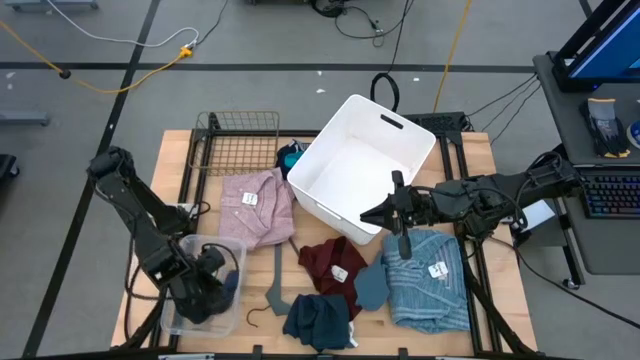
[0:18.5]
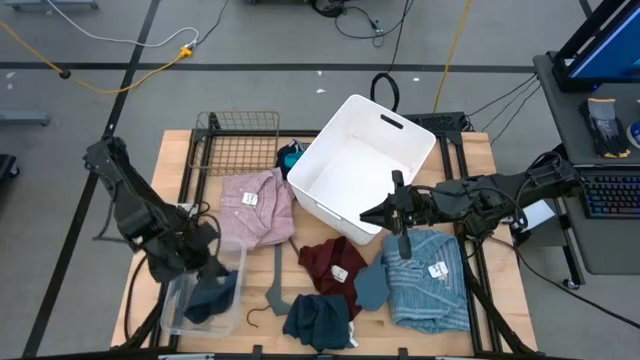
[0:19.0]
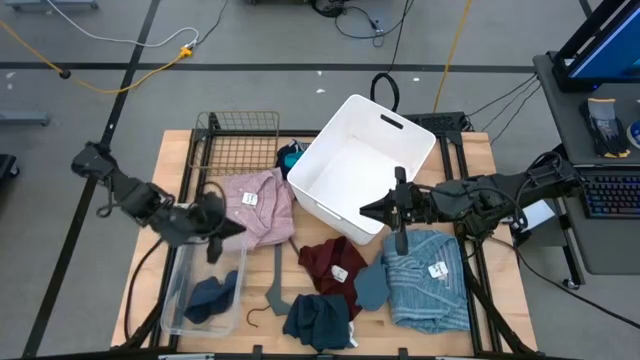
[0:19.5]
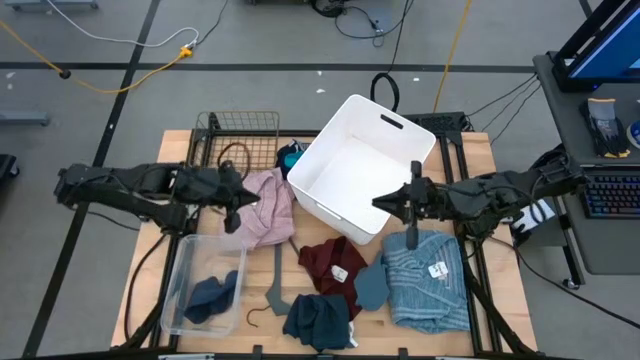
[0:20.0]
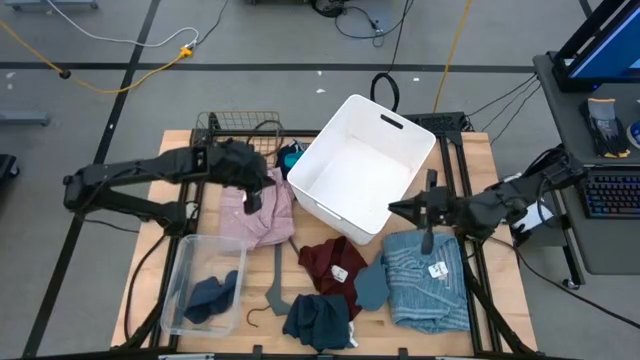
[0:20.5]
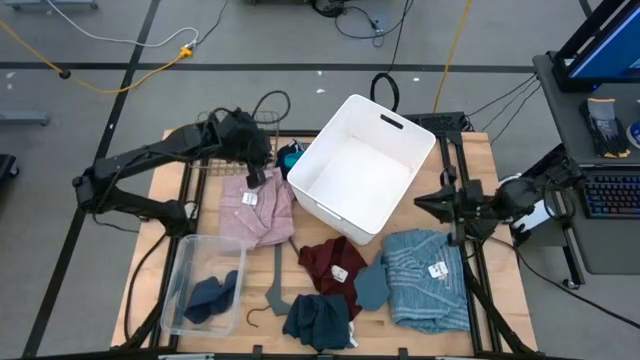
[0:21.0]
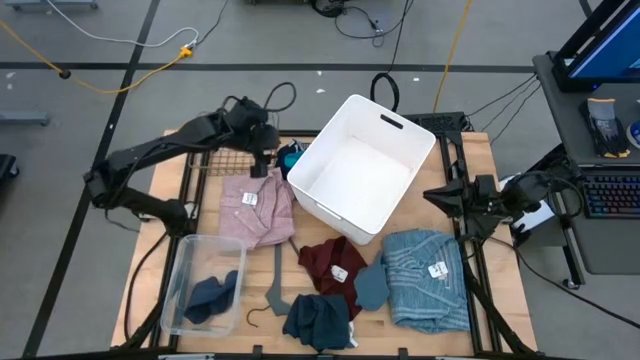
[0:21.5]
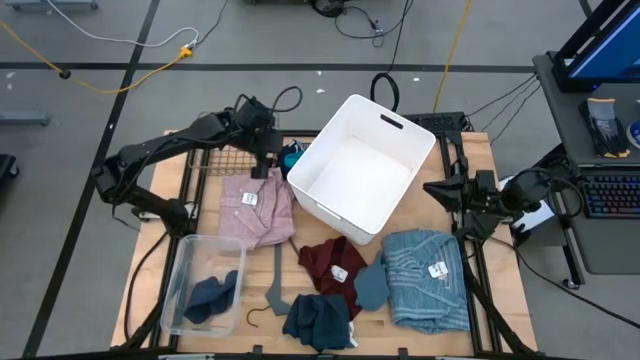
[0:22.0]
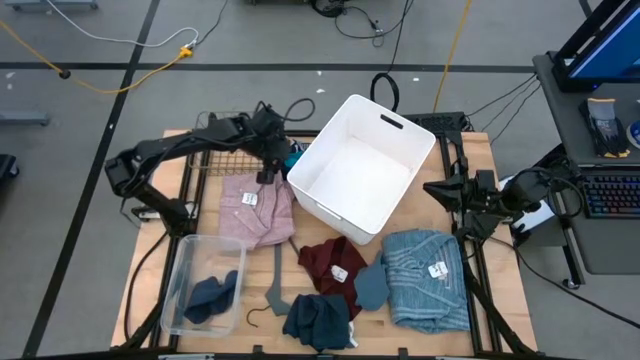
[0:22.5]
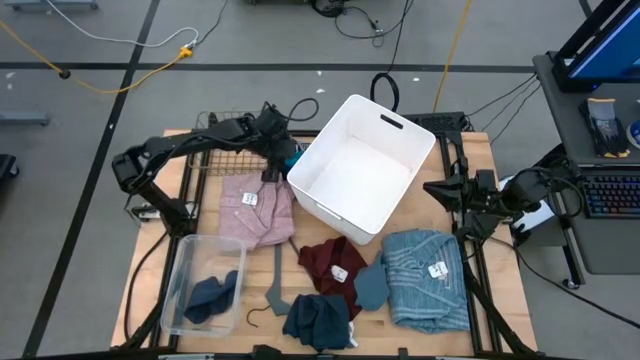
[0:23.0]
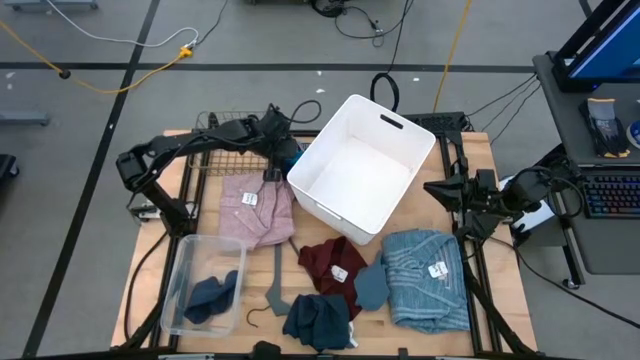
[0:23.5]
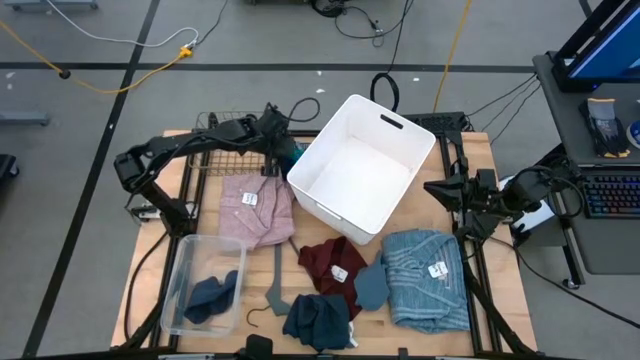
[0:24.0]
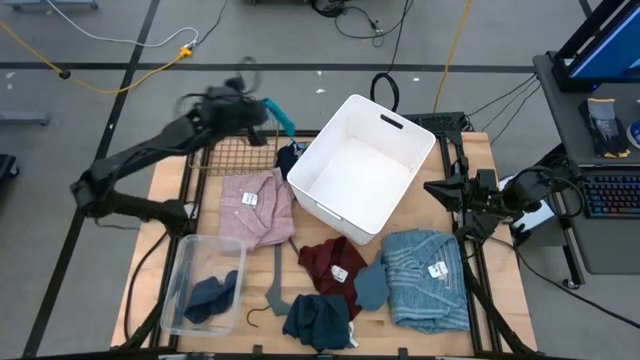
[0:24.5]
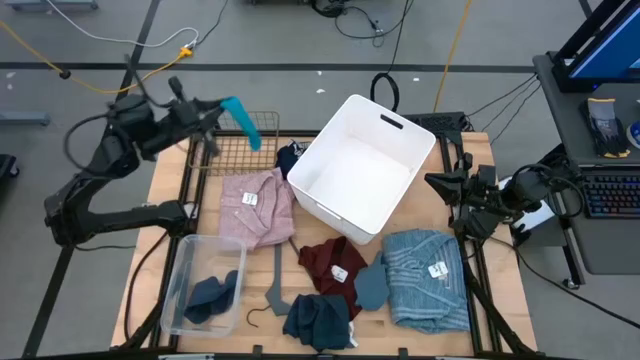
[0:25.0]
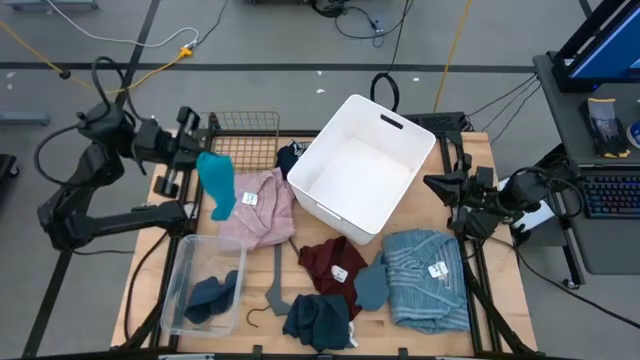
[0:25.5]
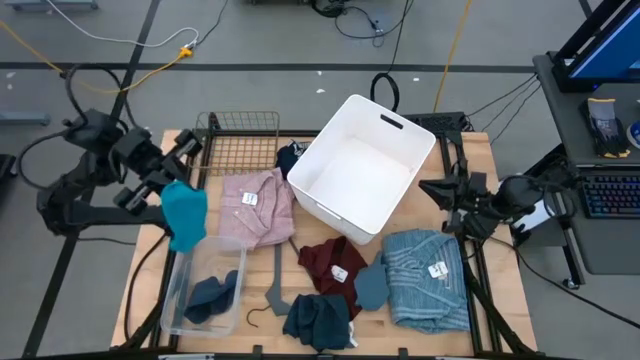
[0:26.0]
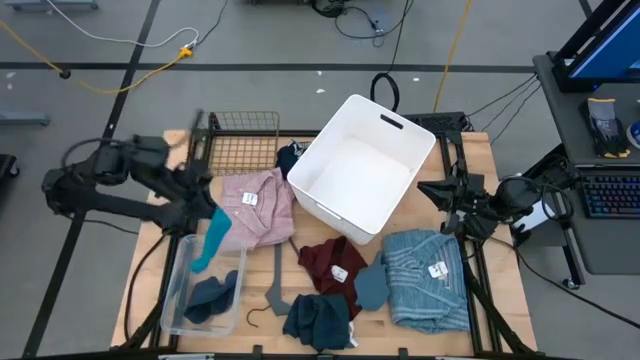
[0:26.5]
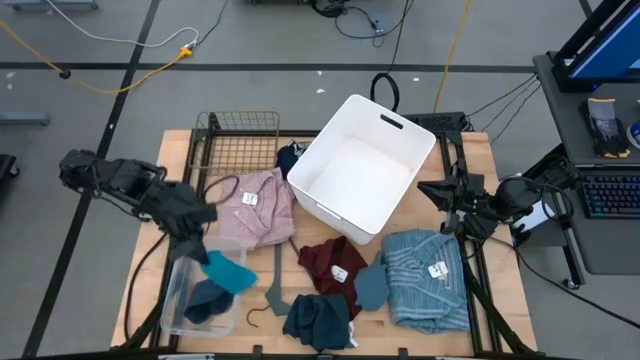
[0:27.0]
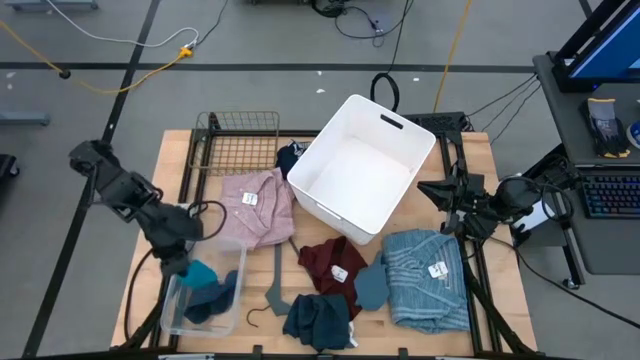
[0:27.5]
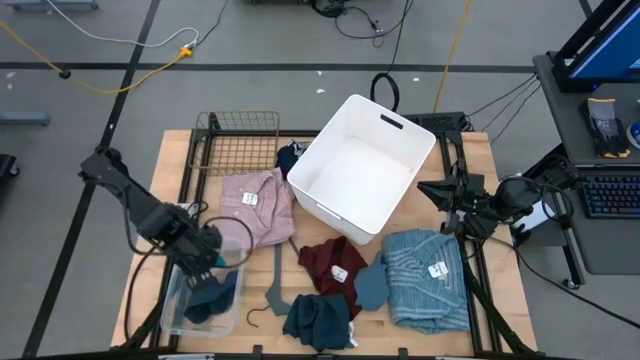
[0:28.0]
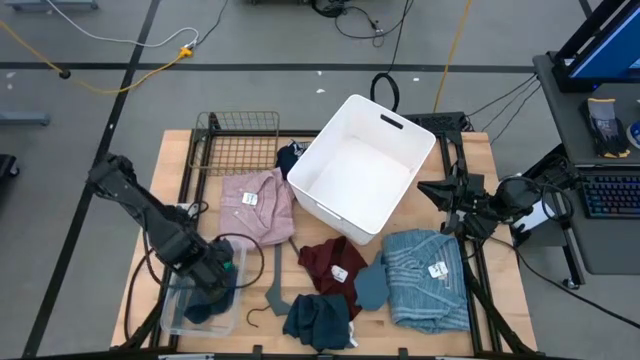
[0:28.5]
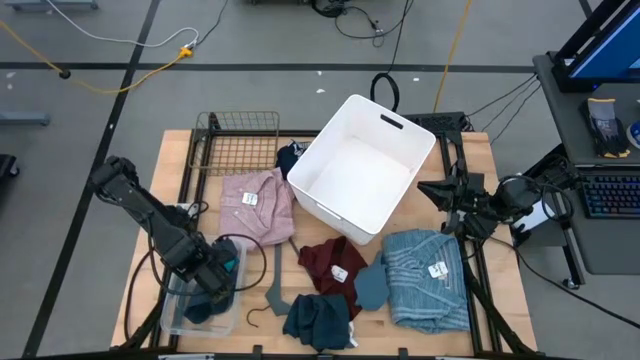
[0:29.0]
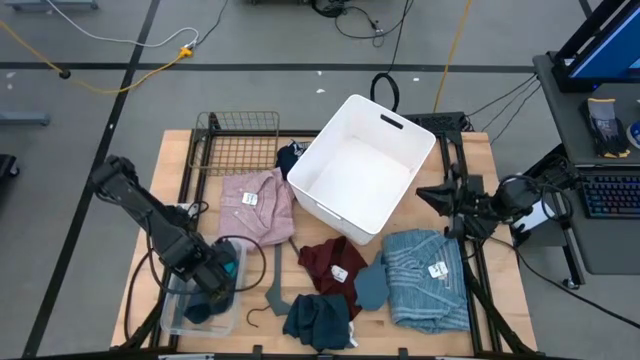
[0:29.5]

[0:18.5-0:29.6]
Task: Pick & Place Cloths
Put the green sock into the transparent bin

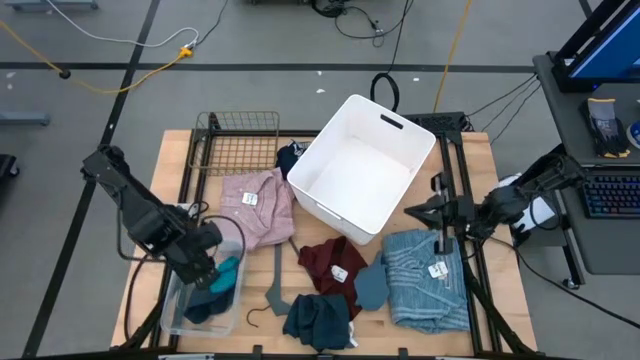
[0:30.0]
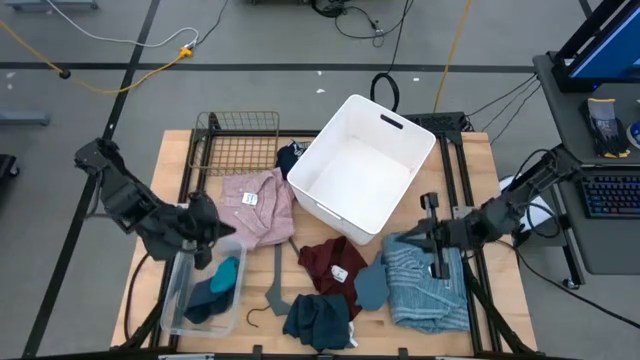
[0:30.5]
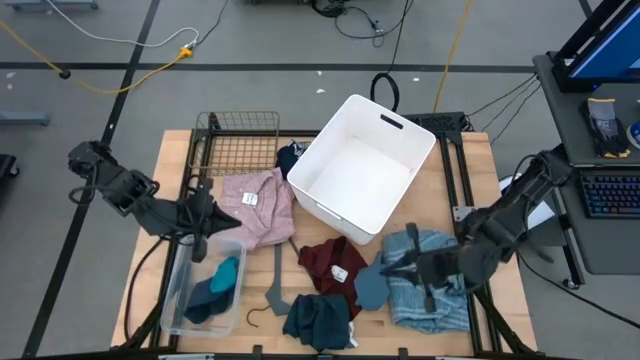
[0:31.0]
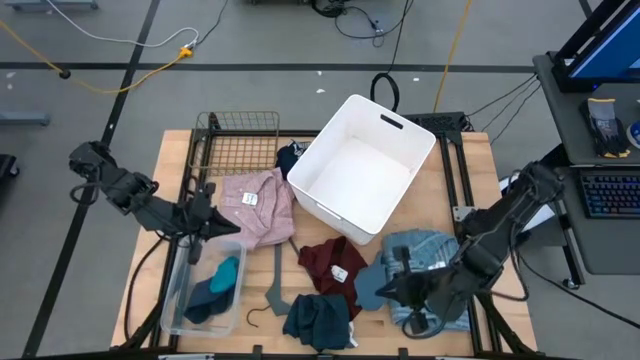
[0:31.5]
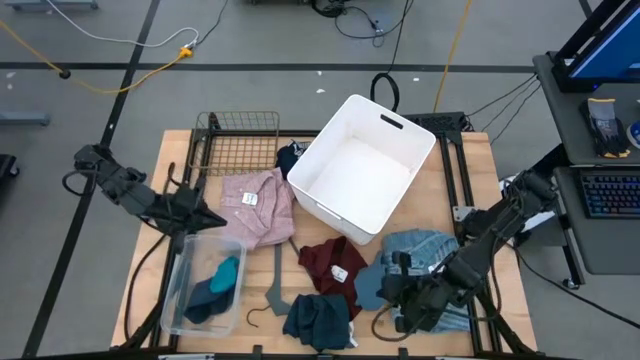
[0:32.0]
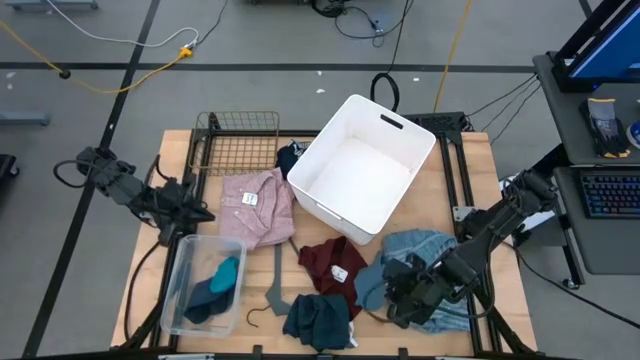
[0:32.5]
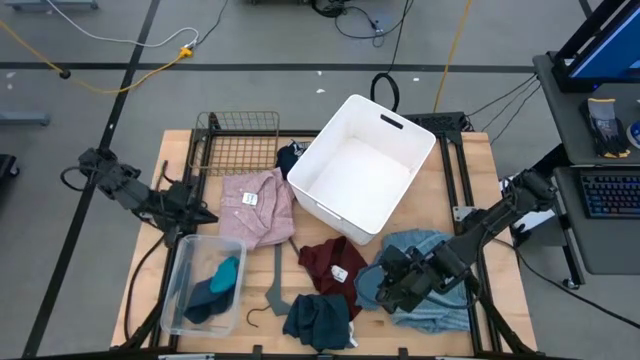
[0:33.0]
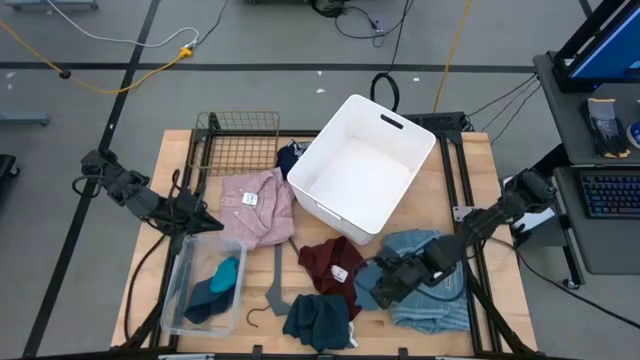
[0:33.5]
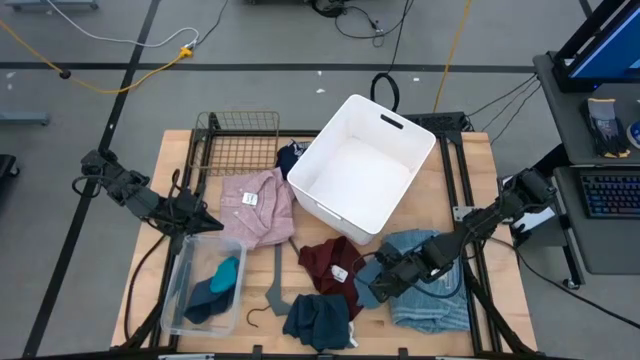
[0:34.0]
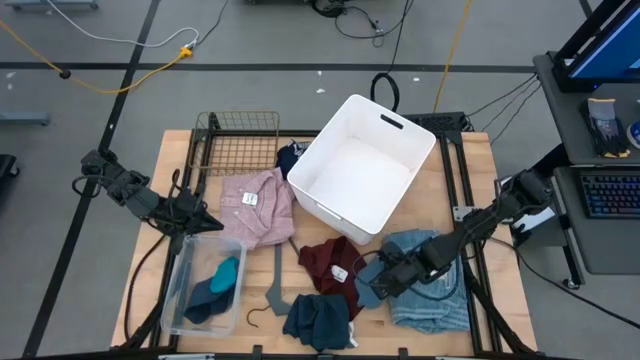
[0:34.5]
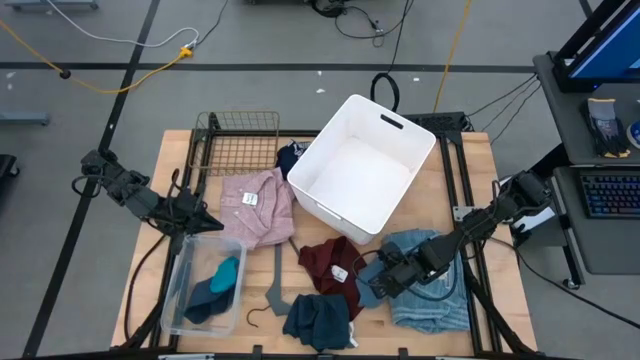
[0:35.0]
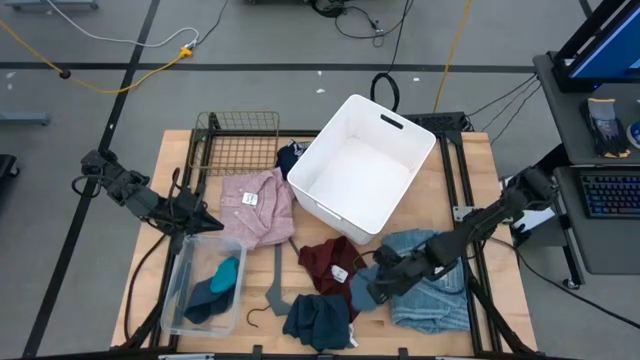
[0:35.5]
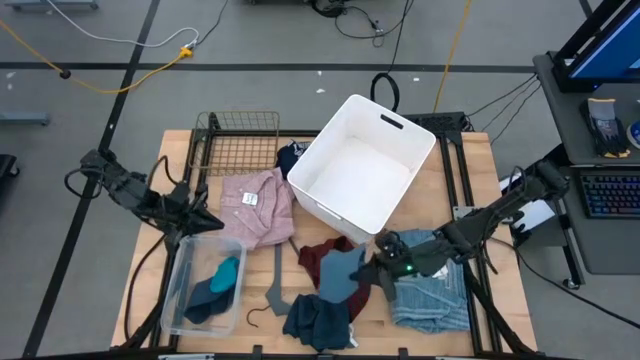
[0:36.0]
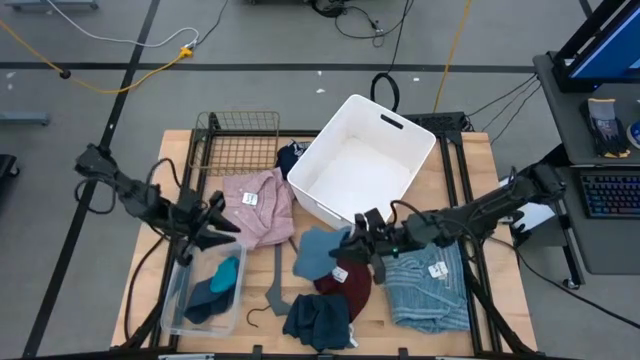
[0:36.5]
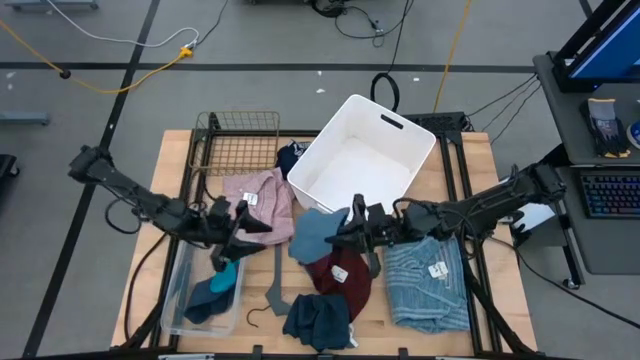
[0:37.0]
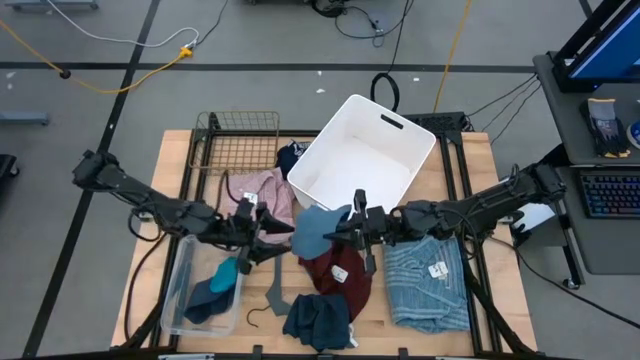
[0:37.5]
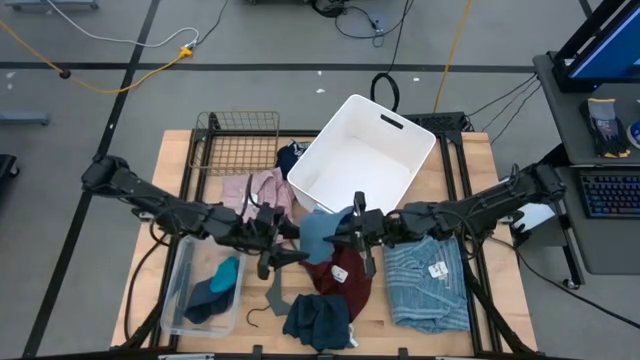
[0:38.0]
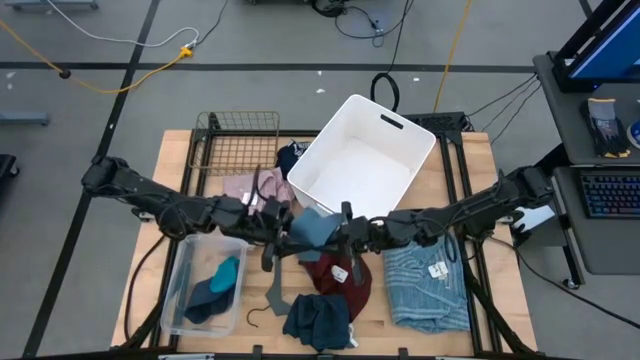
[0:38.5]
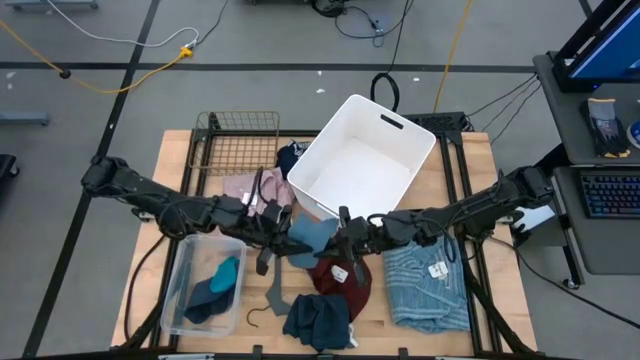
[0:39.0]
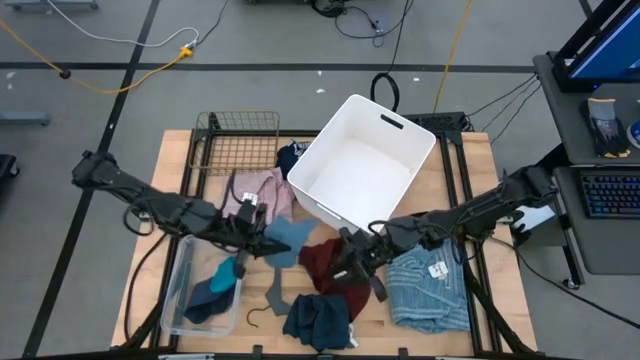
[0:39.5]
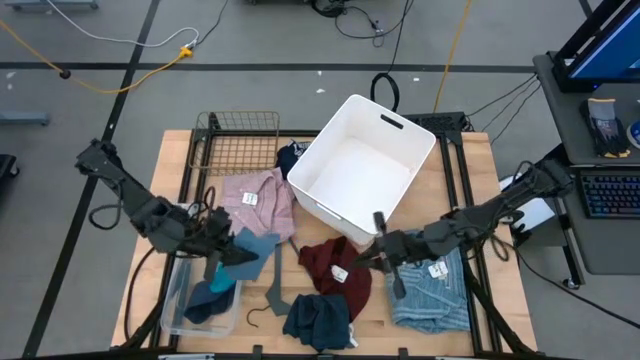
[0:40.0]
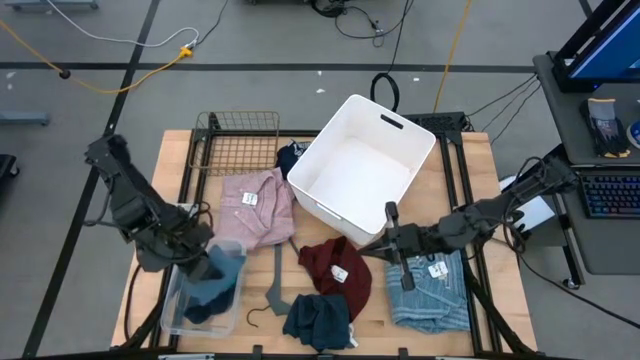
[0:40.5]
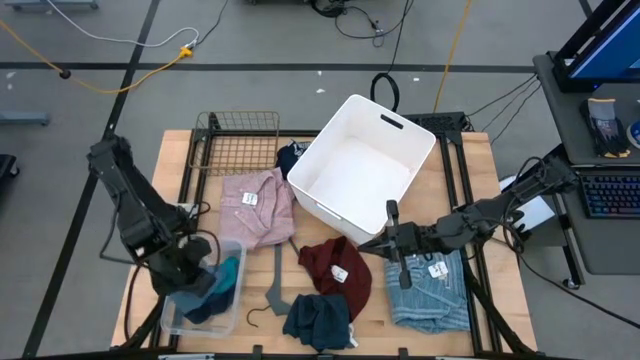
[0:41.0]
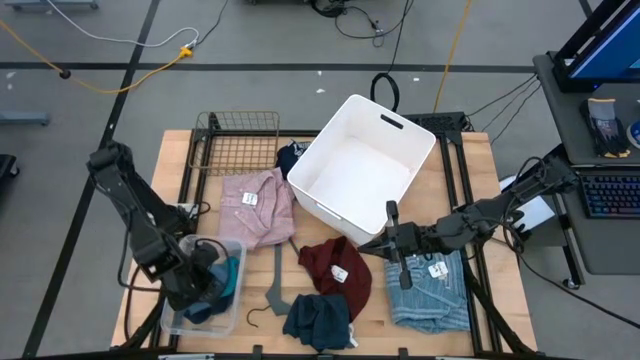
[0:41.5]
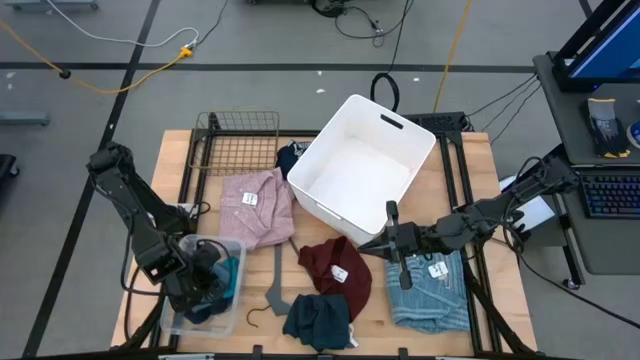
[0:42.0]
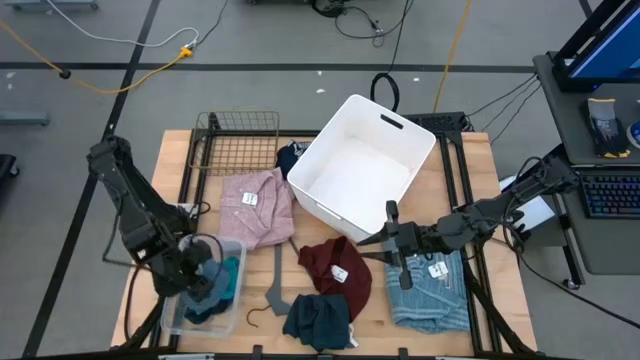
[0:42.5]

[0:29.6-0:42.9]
Put the blue sock into the transparent bin
